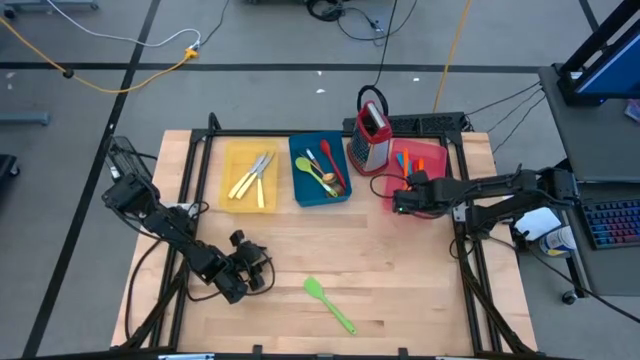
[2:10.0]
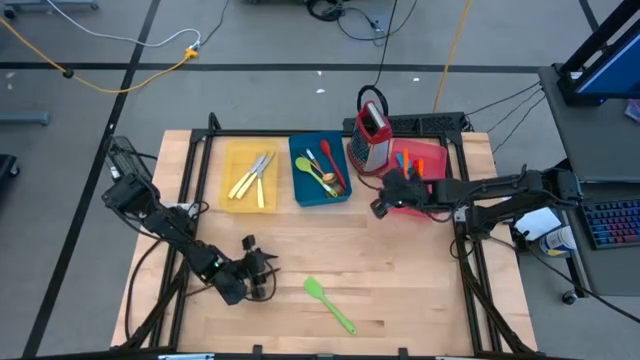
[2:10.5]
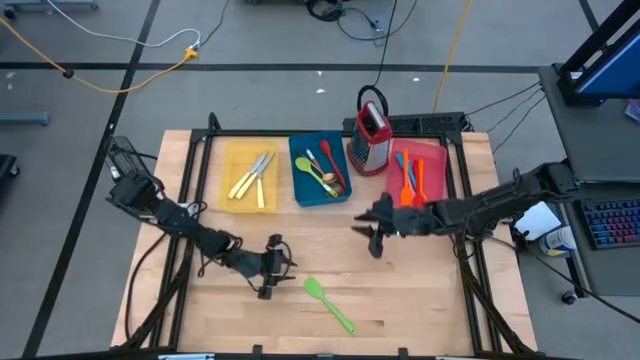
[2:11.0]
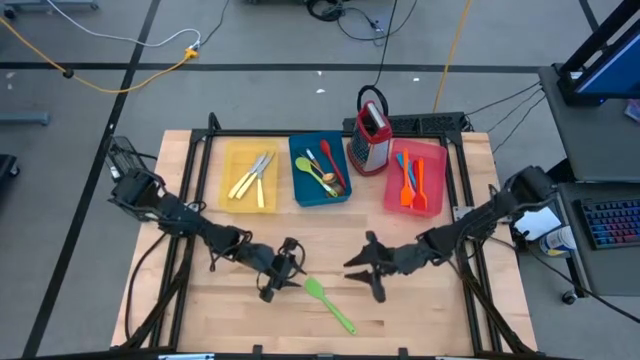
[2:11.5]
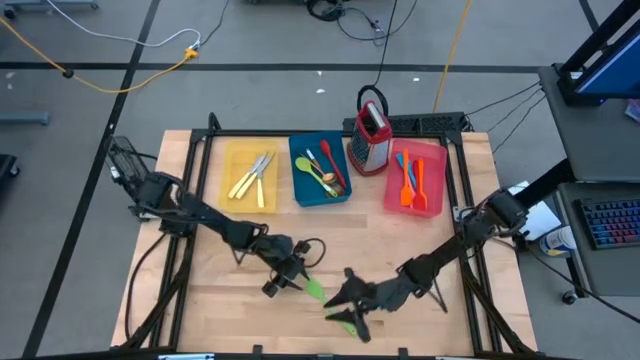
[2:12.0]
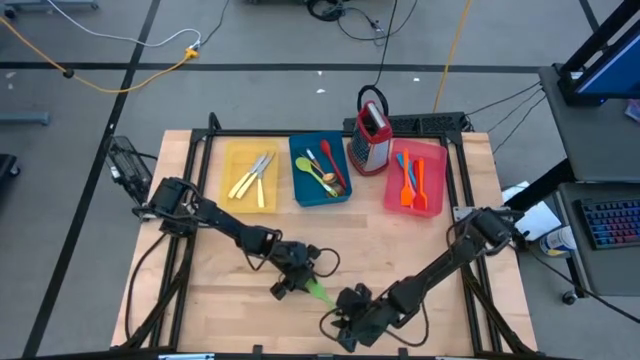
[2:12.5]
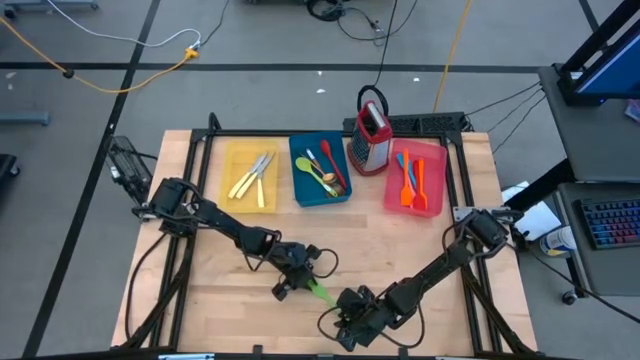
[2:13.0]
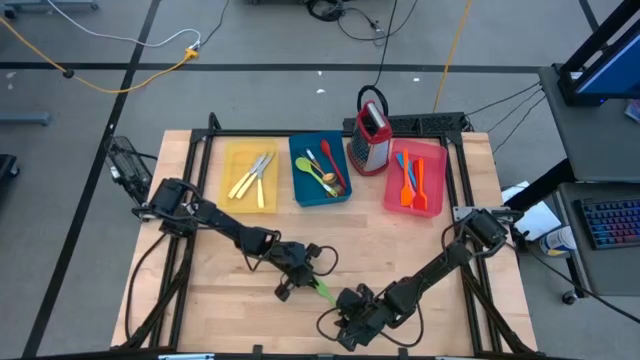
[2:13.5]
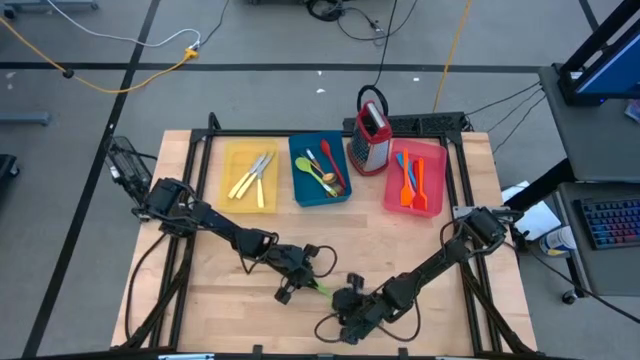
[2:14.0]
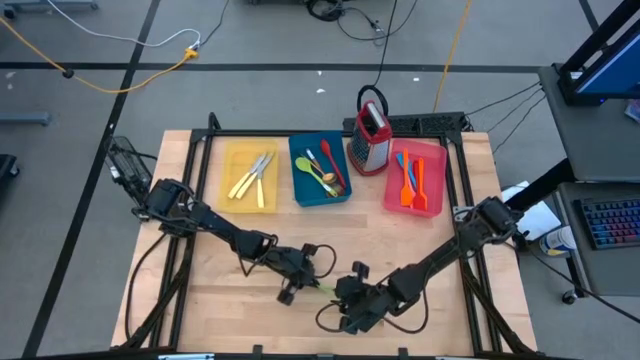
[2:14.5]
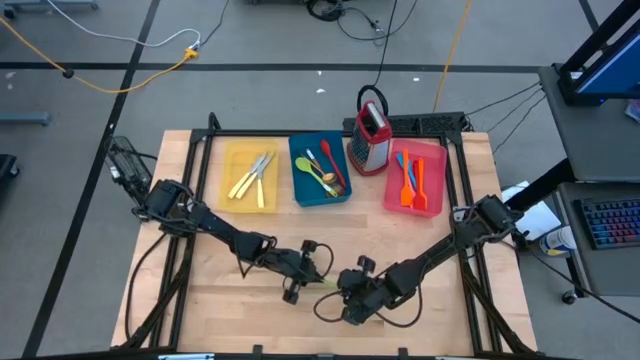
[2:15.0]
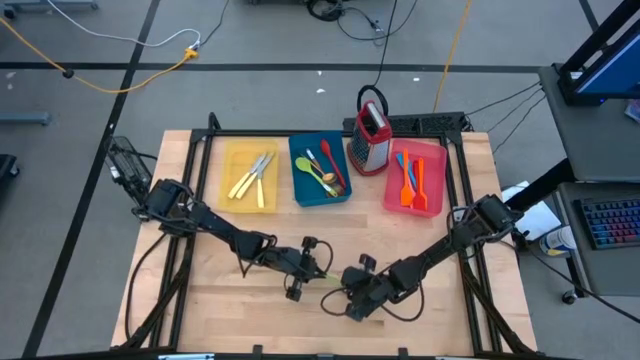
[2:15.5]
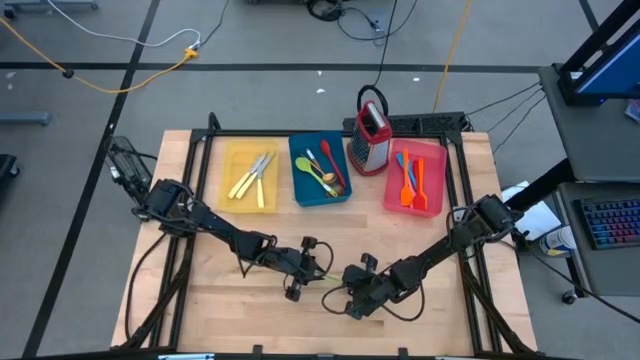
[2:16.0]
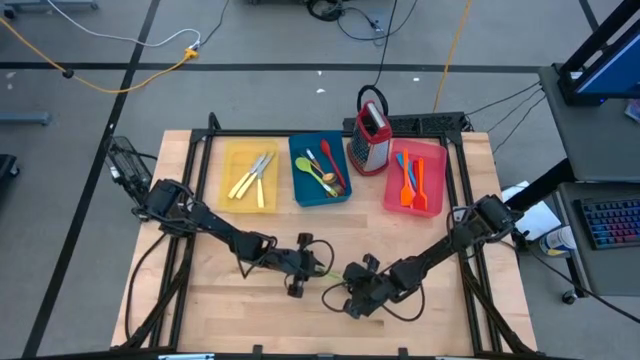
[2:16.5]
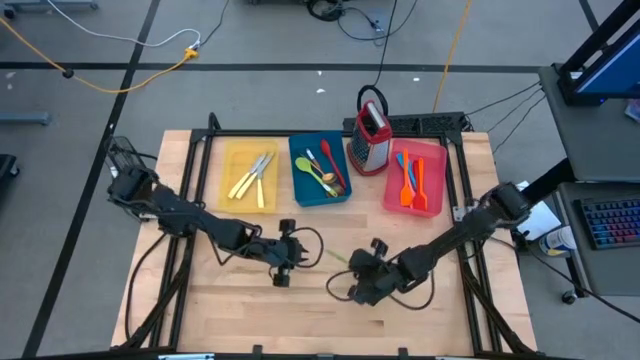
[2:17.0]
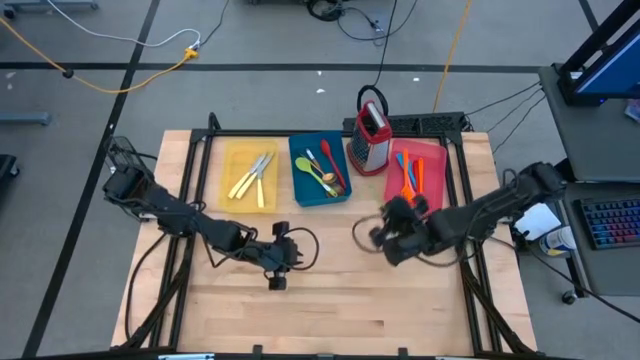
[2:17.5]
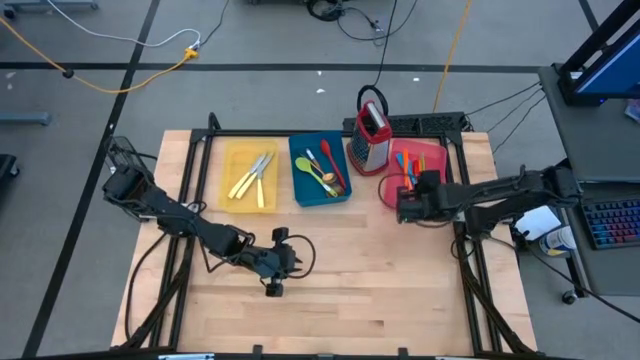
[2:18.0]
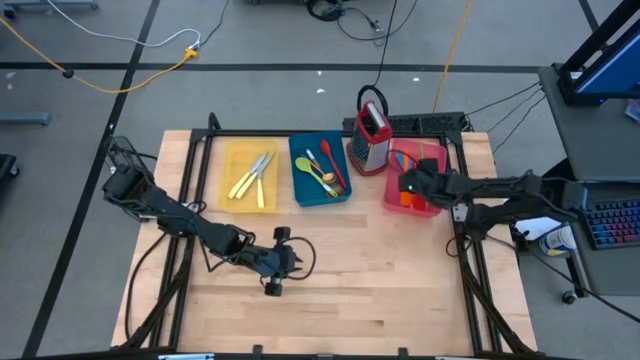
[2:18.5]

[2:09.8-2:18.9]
Task: Pick & Place Kitchen Items
Put the green spatula into the pink bin

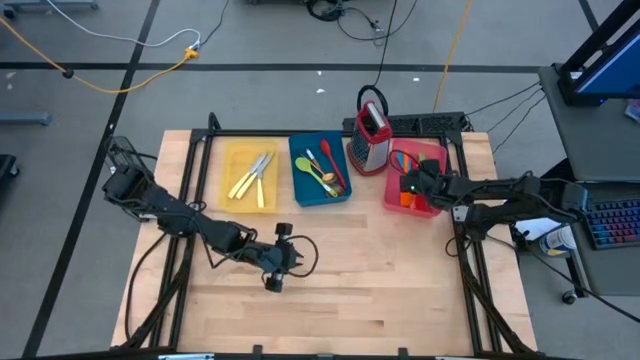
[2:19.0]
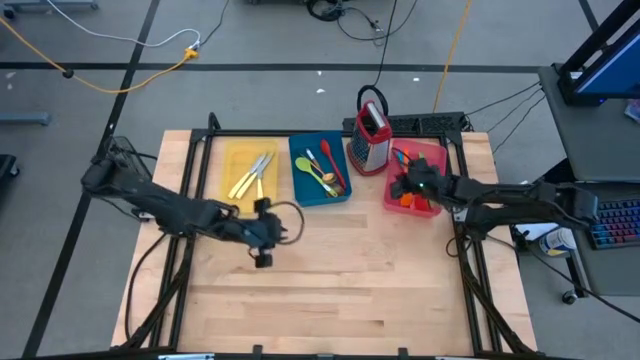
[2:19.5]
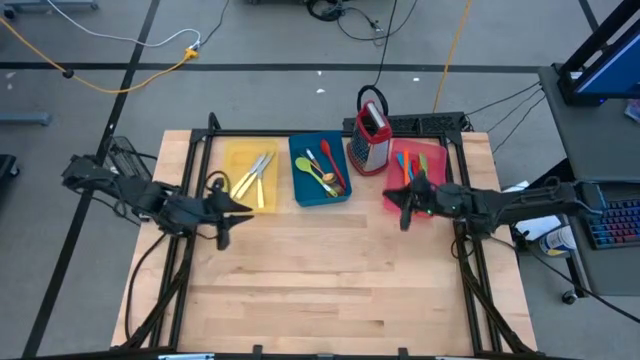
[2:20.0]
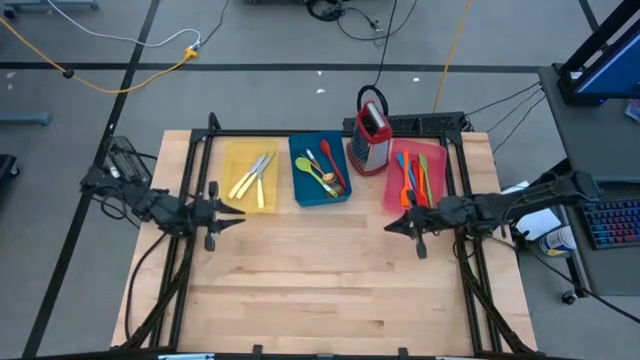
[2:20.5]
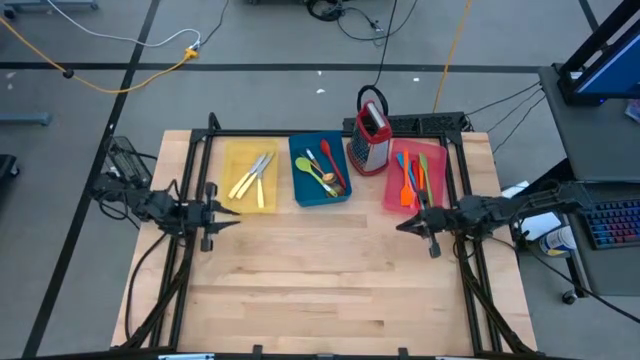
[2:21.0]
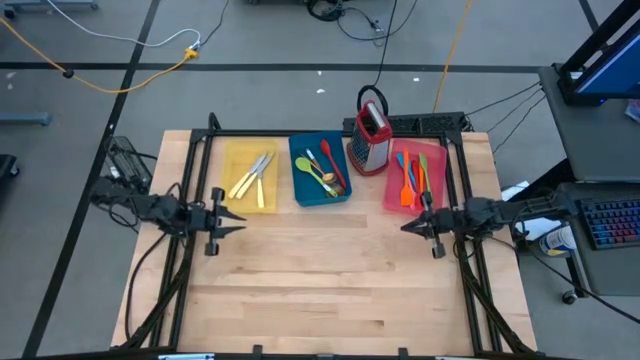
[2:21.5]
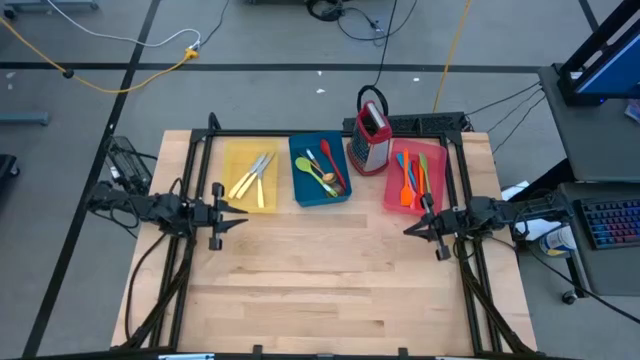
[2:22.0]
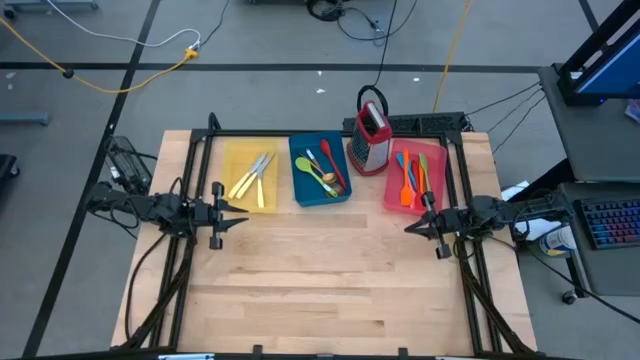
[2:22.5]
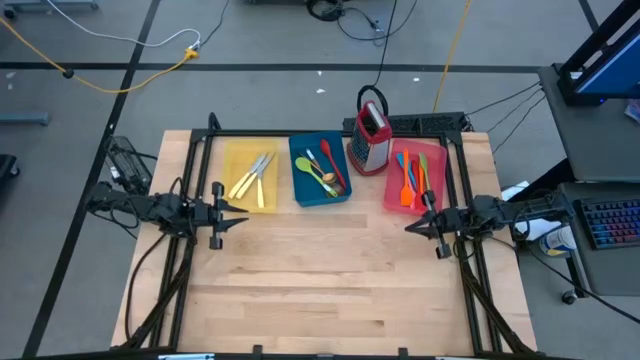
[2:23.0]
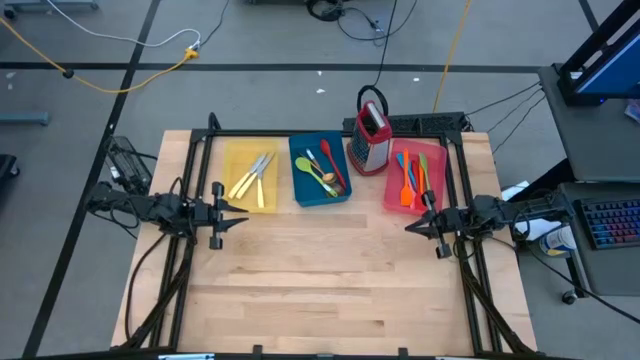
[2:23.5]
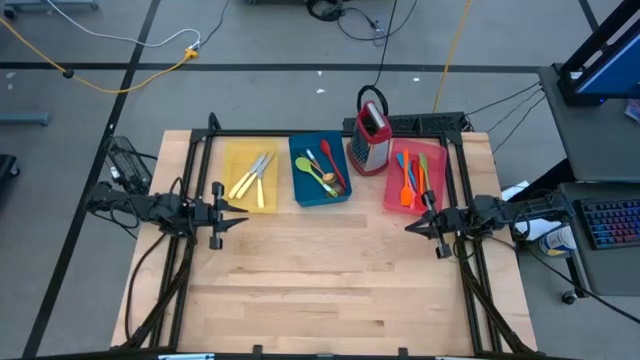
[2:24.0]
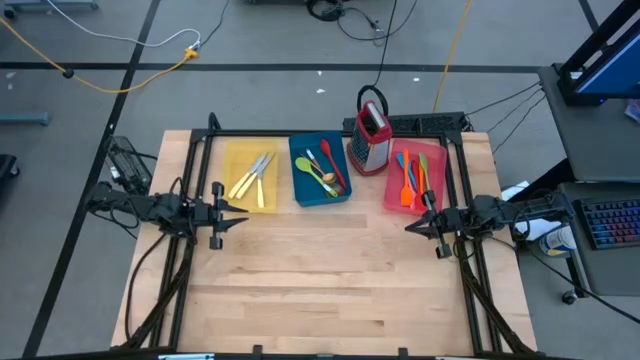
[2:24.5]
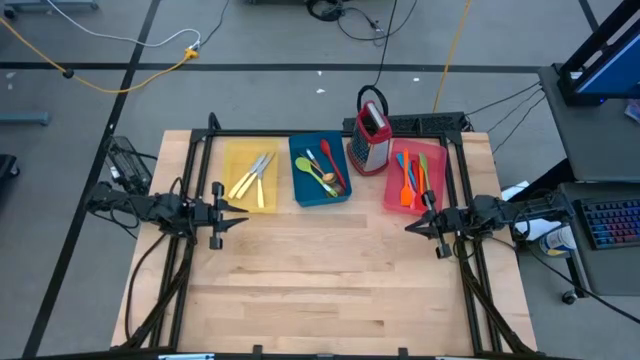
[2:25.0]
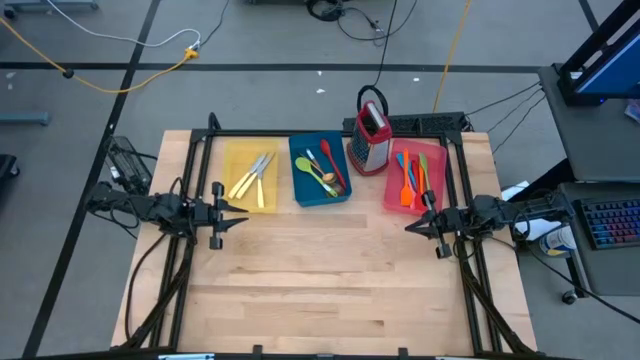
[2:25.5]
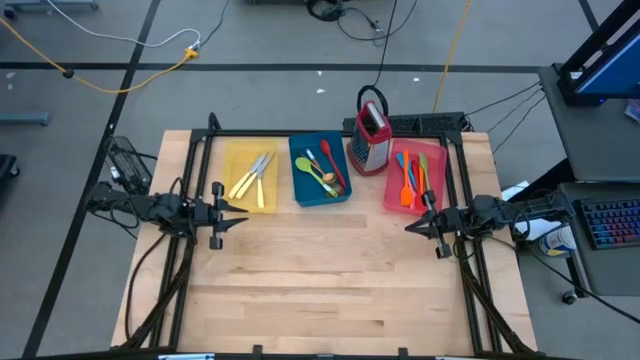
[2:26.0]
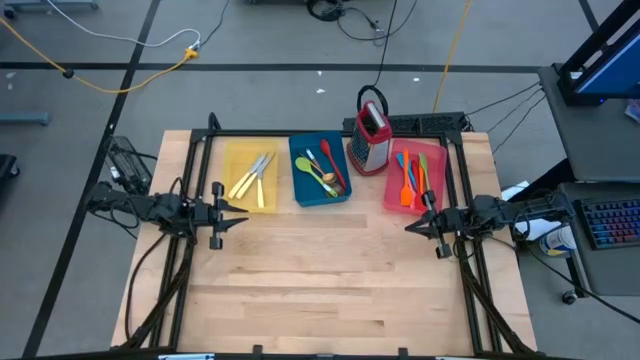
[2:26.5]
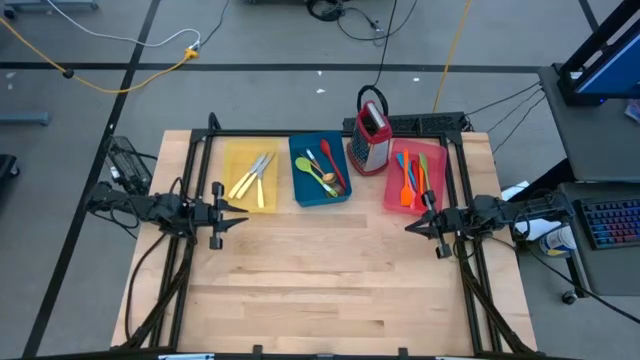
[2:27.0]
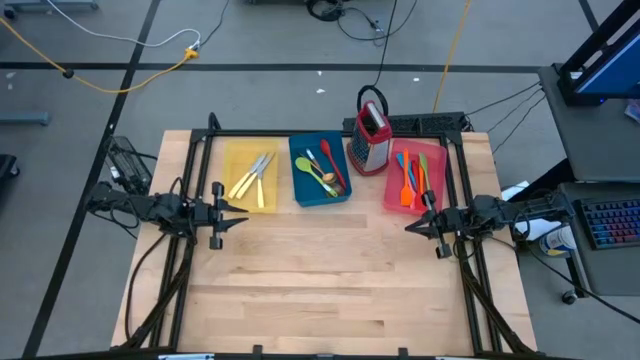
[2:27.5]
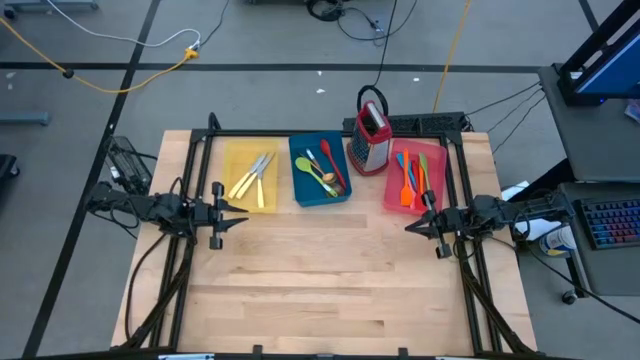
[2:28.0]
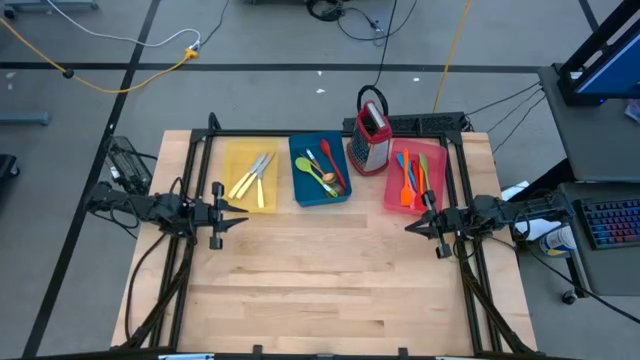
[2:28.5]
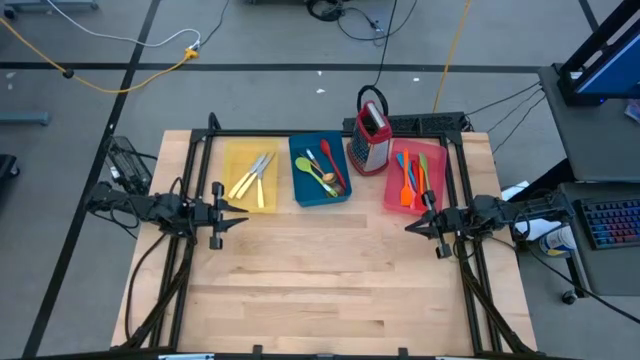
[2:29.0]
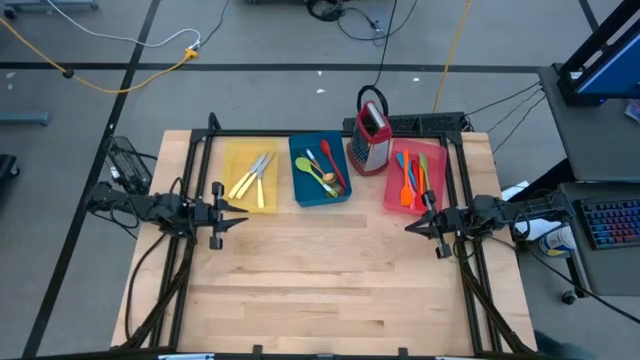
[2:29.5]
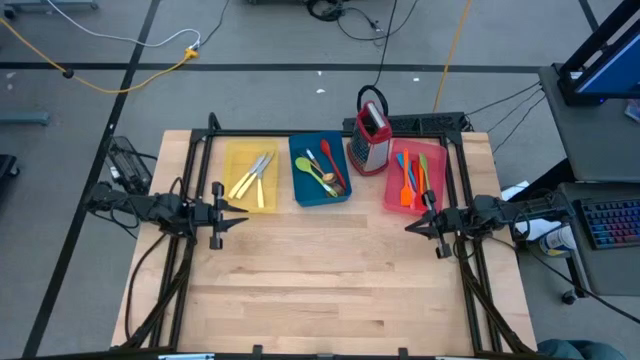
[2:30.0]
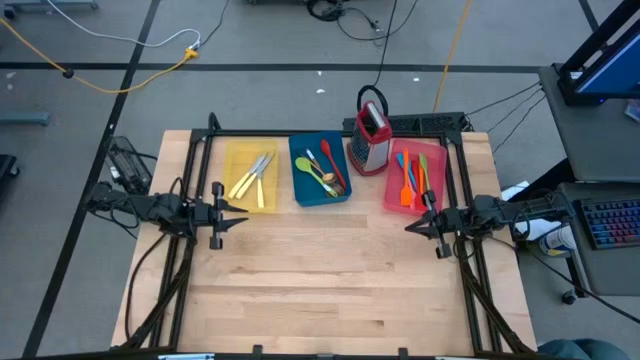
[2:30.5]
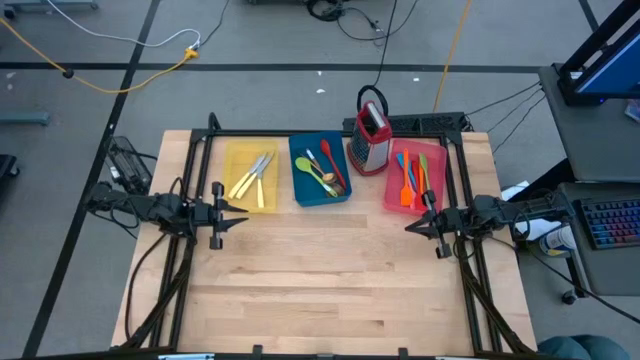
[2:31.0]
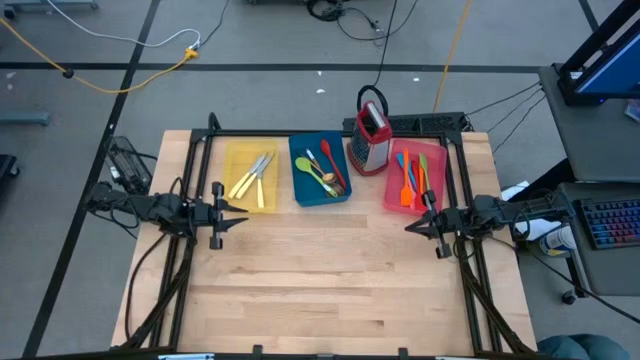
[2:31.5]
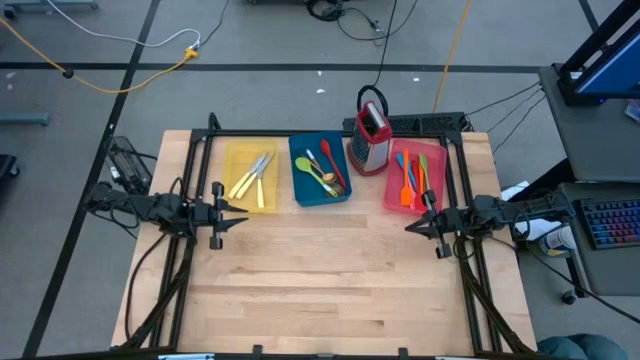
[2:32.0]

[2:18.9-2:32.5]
Return to Home Position
